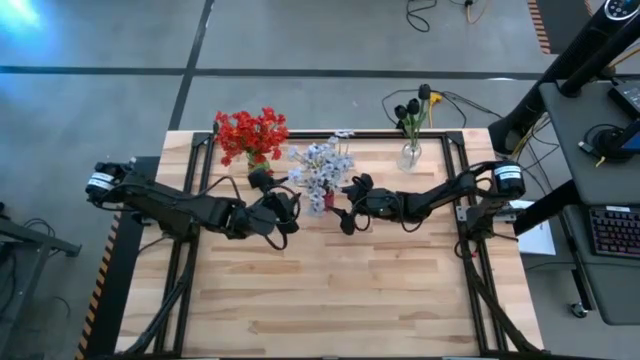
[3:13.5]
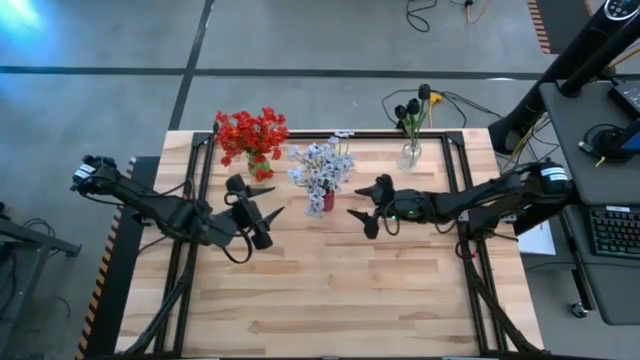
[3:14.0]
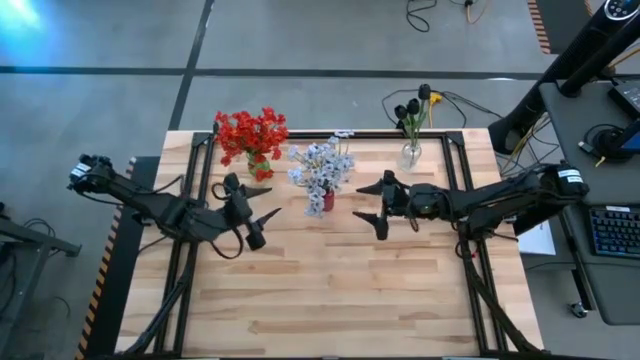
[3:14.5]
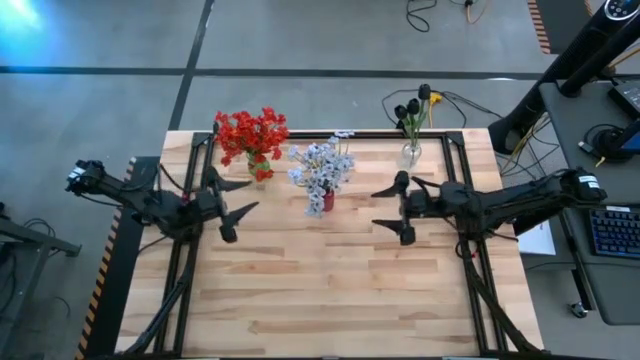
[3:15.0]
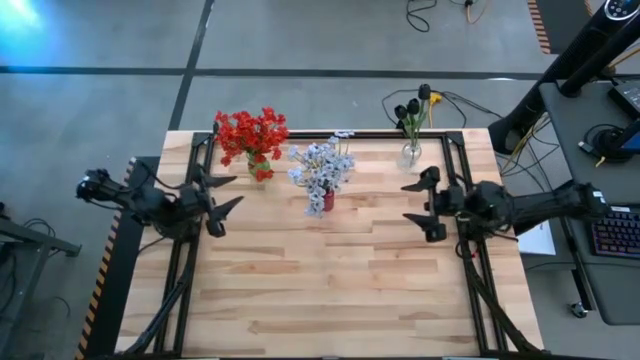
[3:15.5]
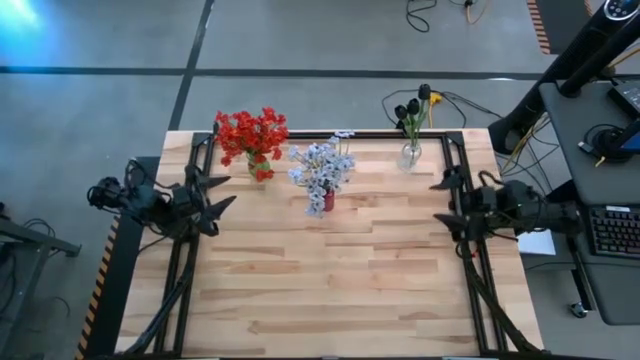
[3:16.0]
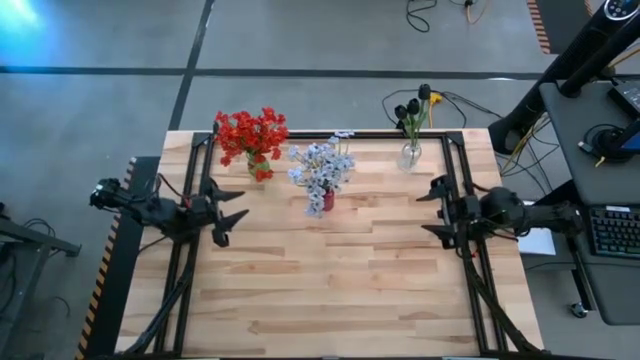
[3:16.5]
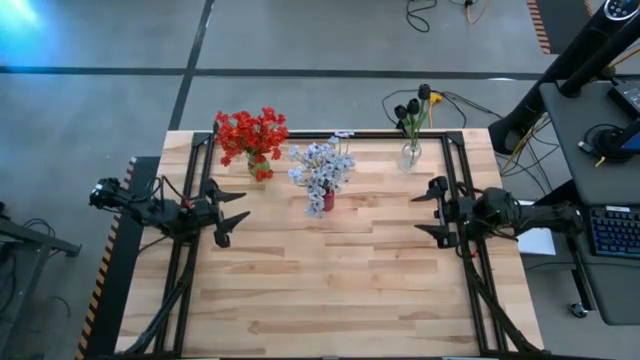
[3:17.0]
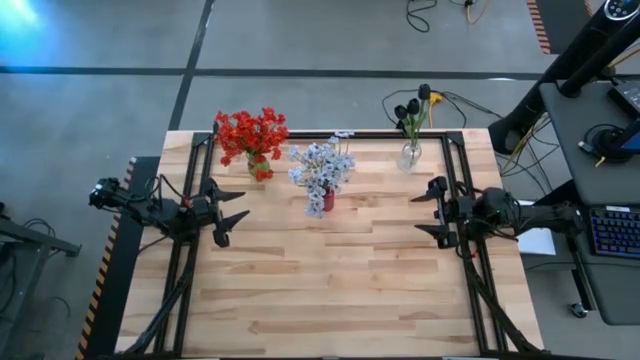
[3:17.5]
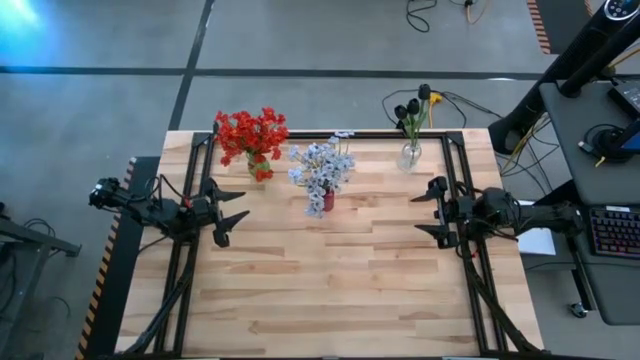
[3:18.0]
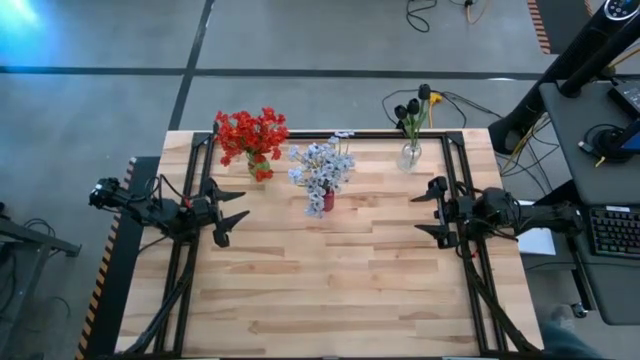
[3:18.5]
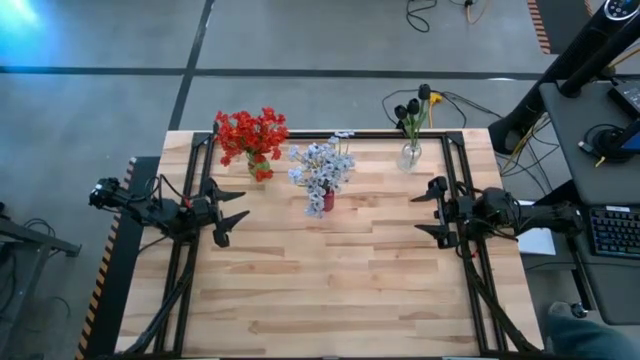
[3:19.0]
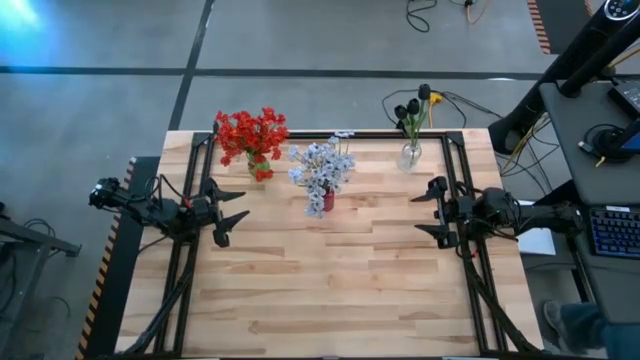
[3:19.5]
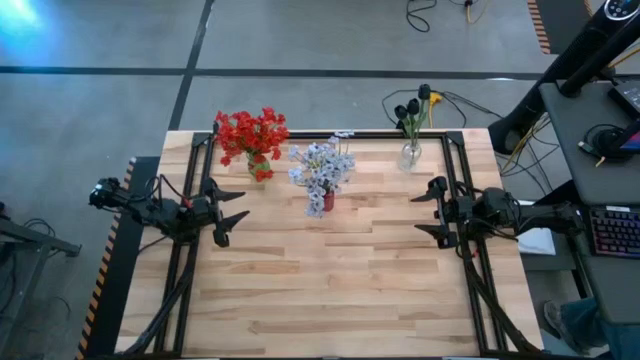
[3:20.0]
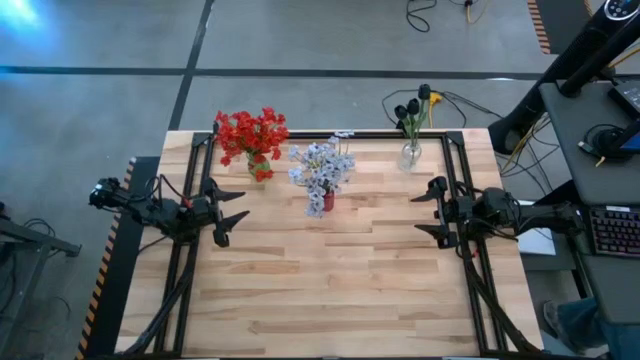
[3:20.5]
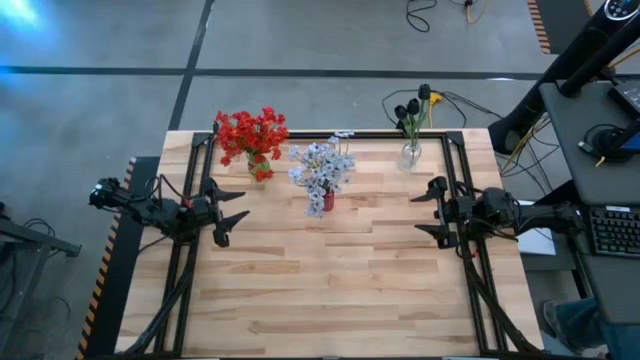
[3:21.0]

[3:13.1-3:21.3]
Task: Sort flowers into vase by color
Return to Home Position

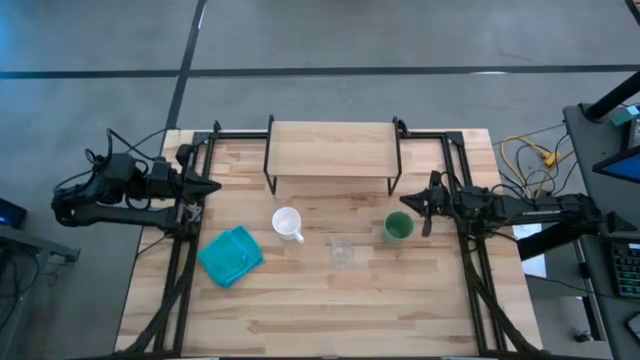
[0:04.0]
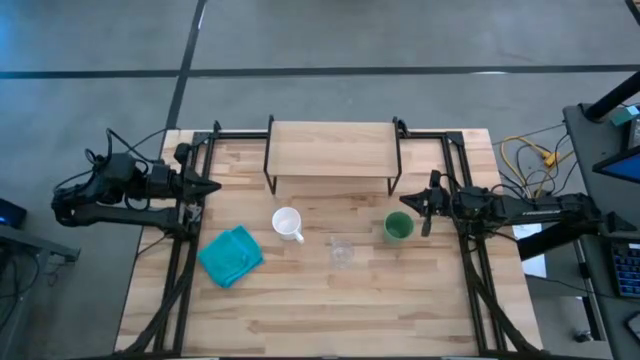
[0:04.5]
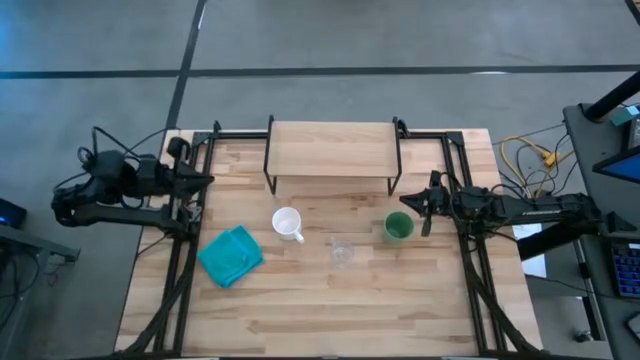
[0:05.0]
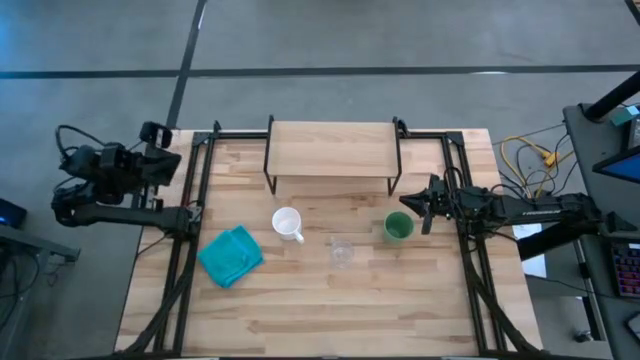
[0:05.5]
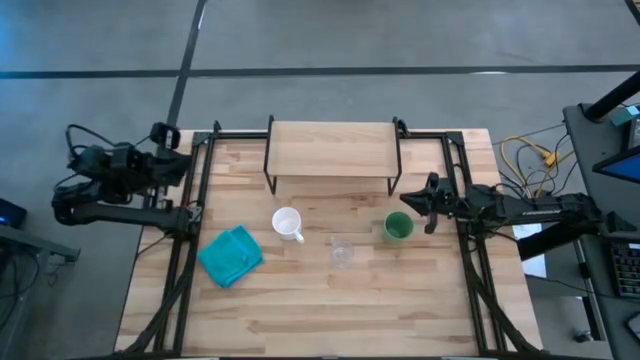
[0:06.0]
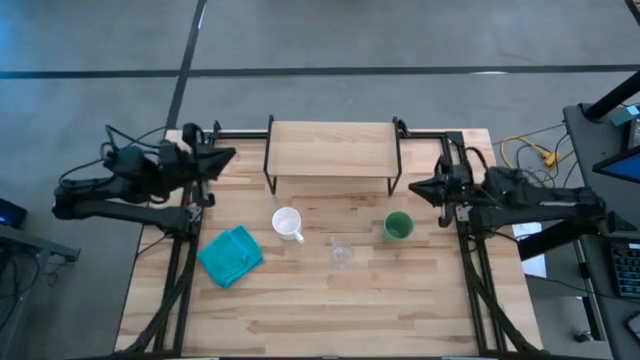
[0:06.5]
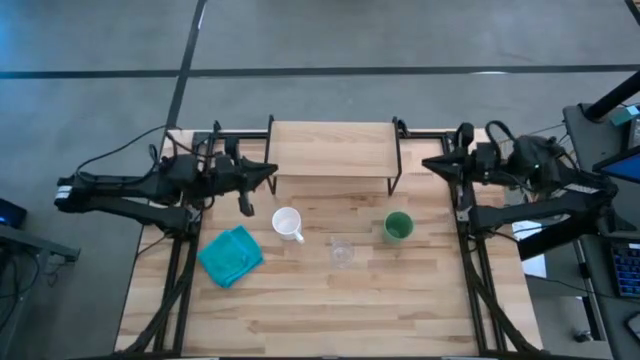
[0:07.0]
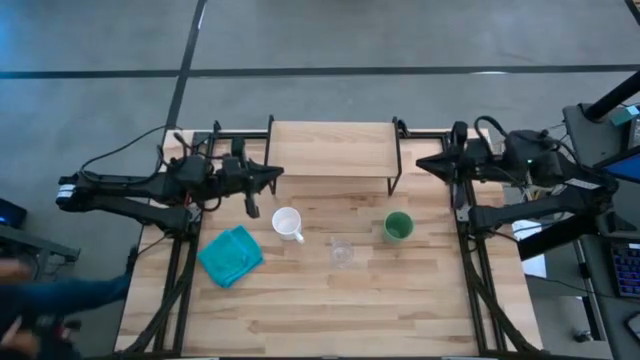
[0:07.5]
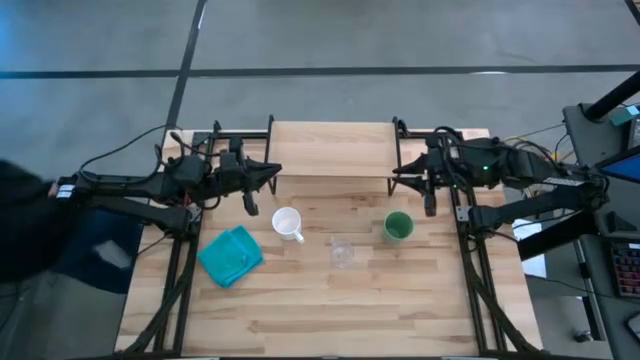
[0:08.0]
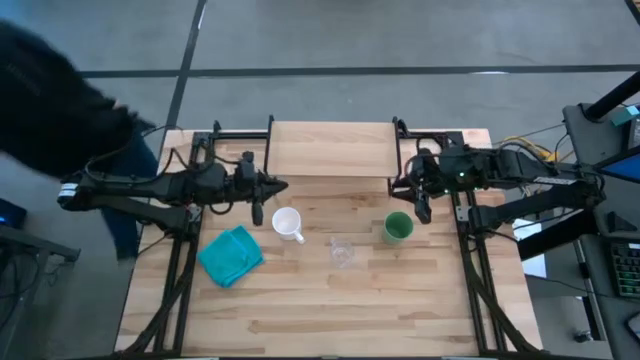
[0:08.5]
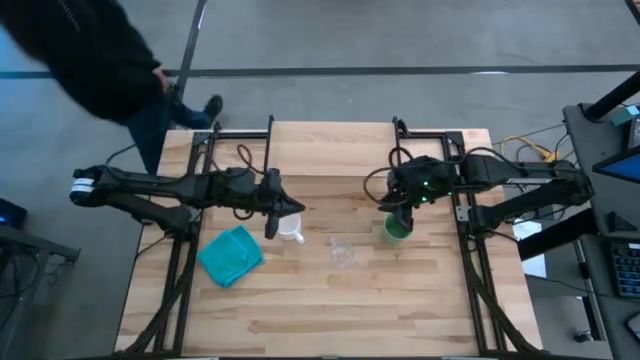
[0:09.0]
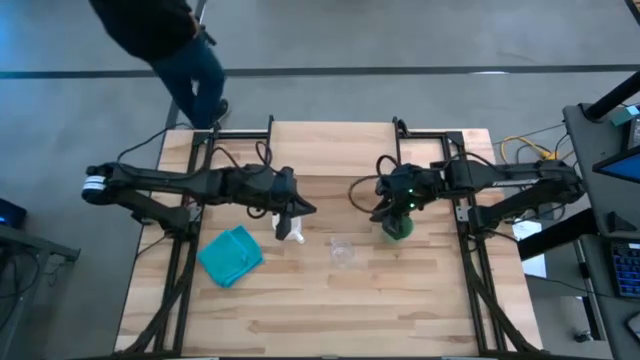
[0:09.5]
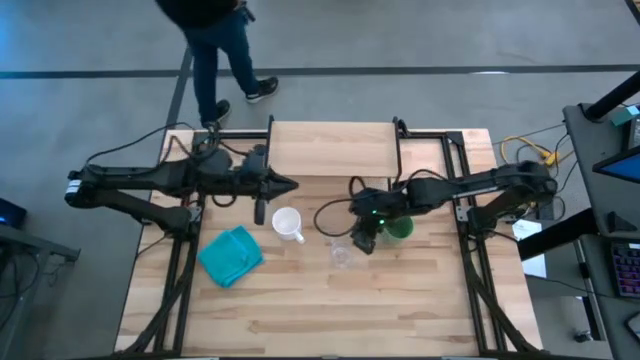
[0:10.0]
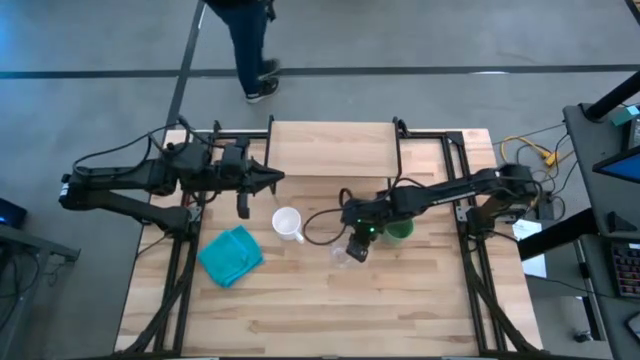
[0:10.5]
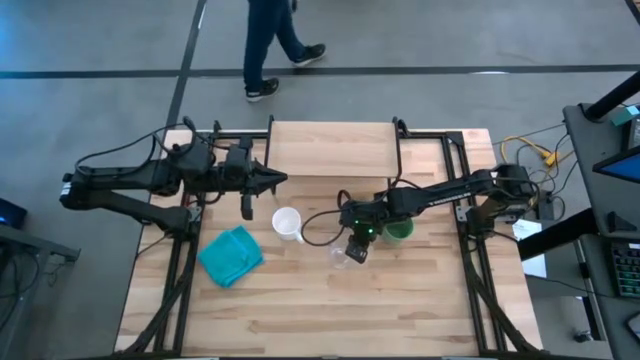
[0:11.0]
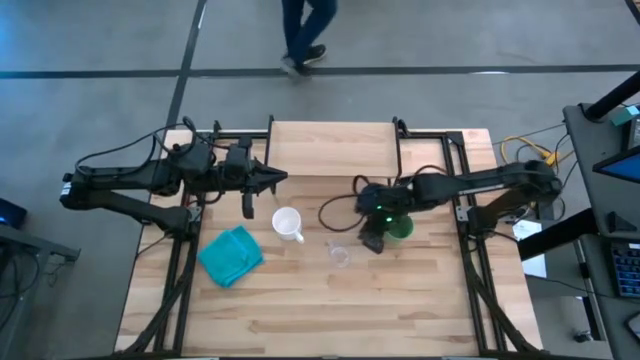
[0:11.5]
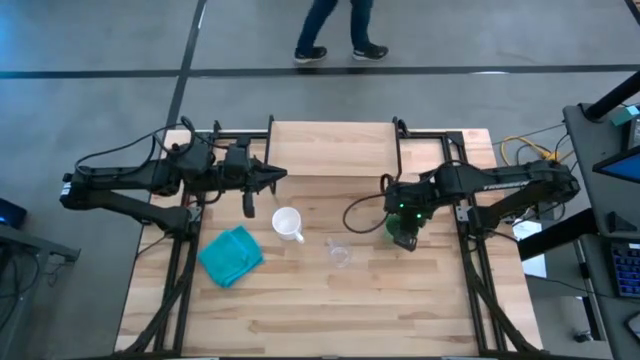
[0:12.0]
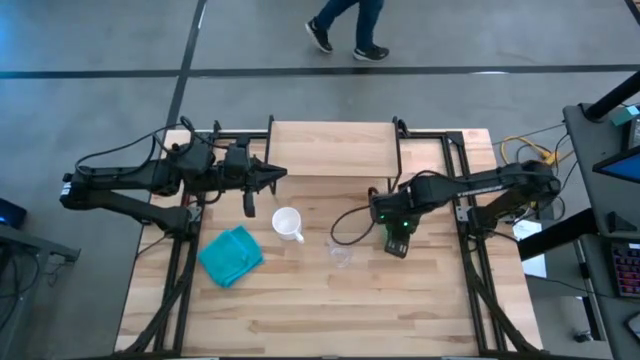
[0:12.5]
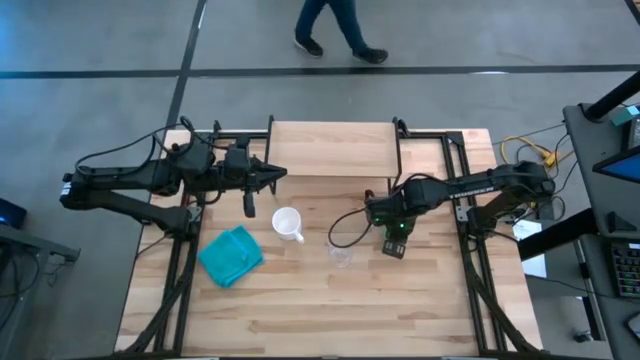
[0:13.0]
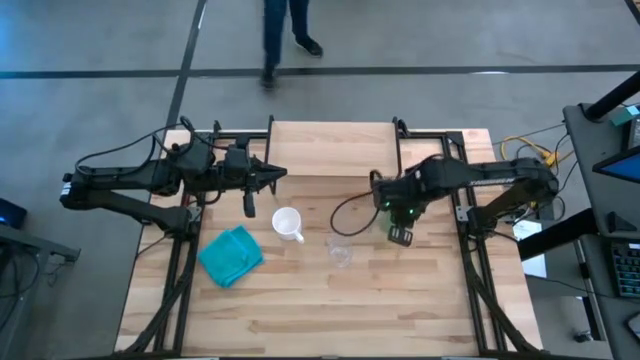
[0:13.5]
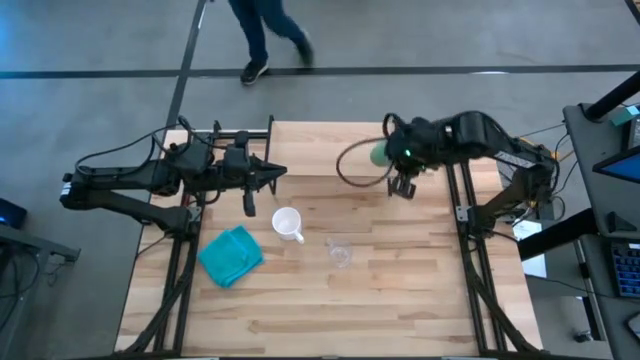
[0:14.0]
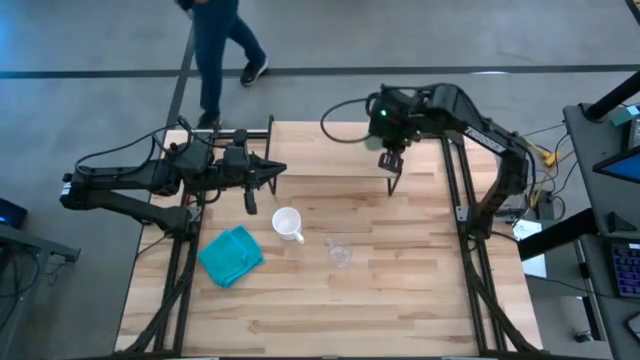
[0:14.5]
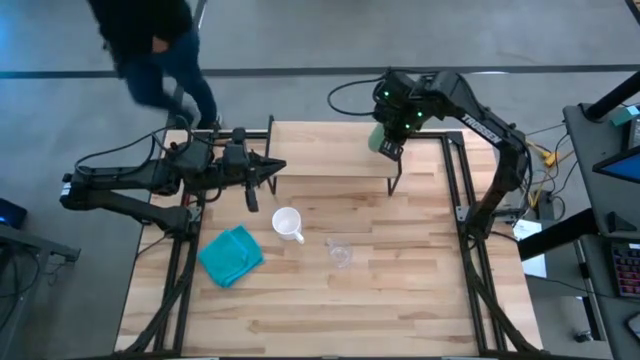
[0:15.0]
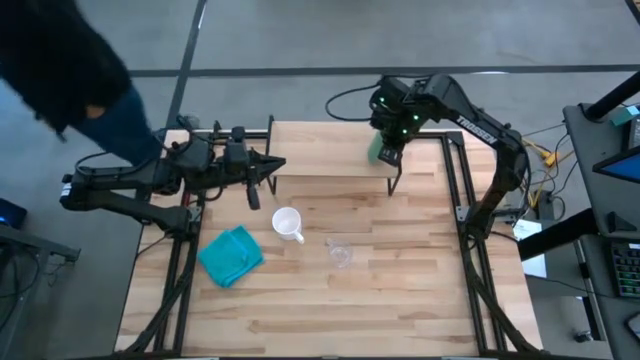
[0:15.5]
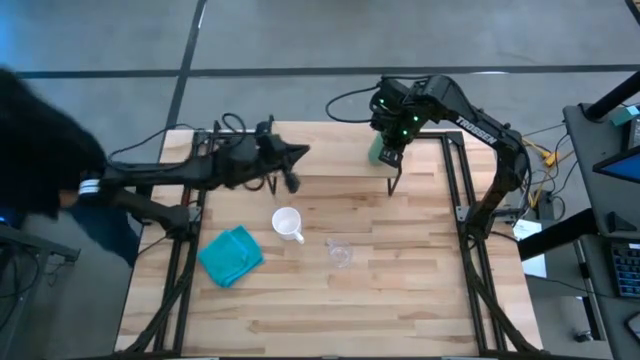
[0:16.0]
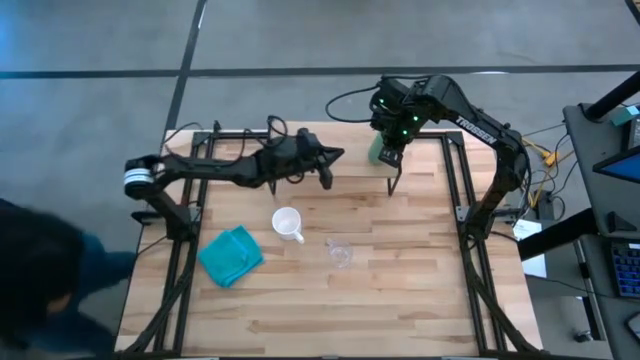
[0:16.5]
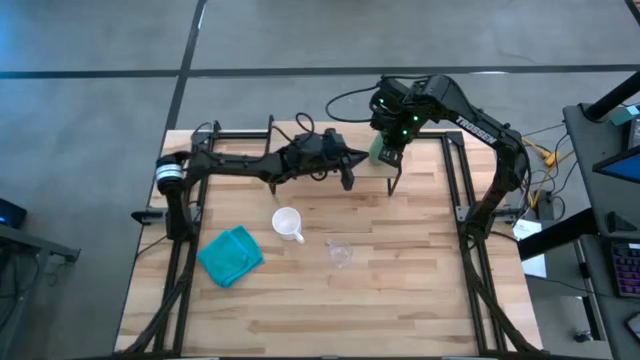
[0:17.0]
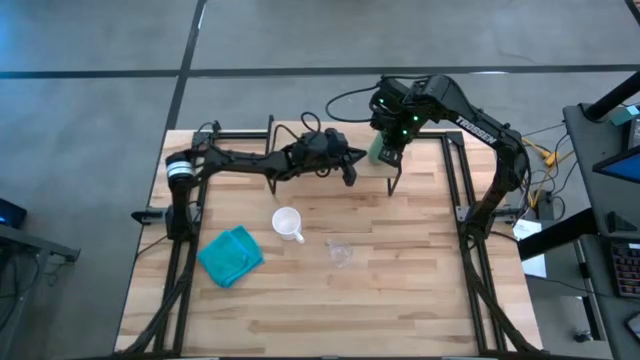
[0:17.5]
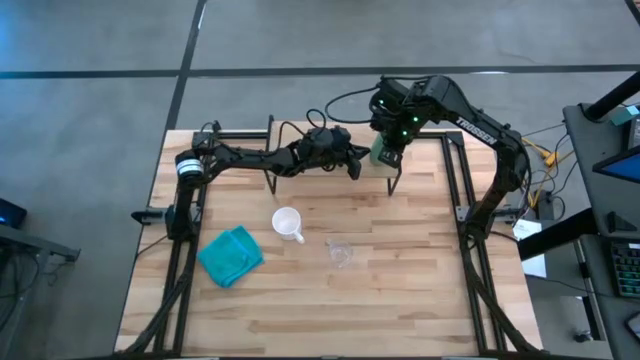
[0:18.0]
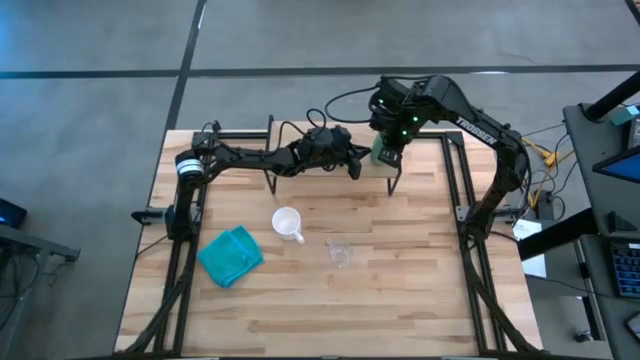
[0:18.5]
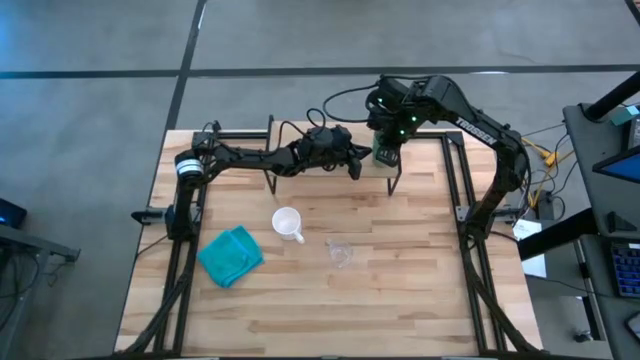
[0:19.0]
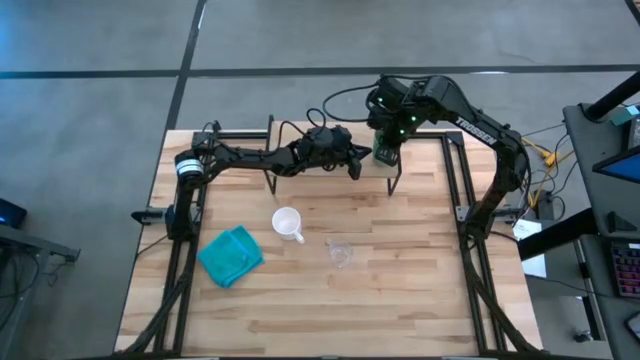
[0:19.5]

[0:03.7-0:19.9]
Task: Stack small to large cups/mugs on shelf
Put the green mug on the shelf
